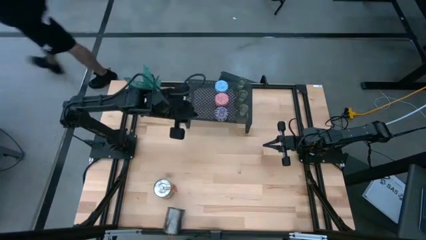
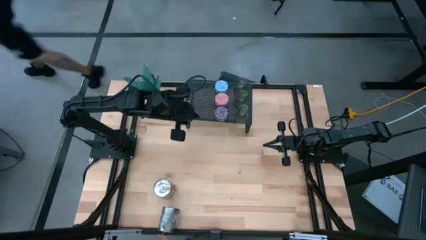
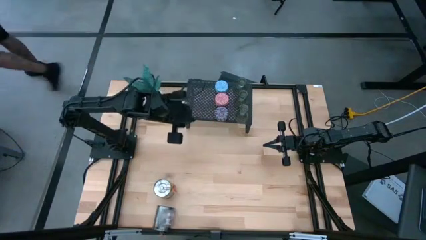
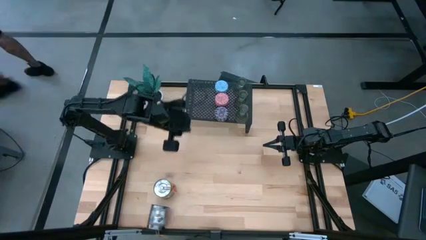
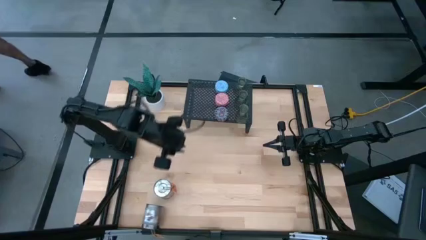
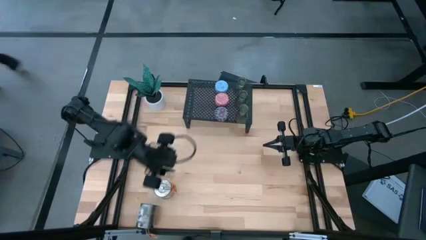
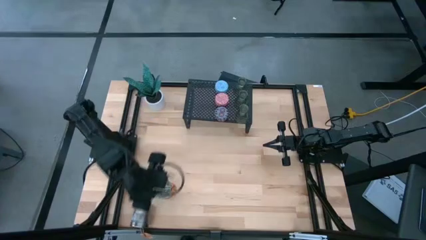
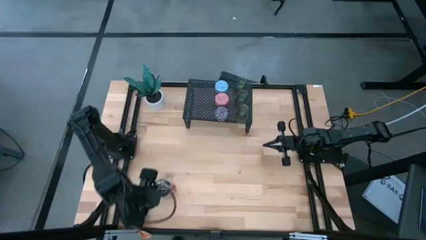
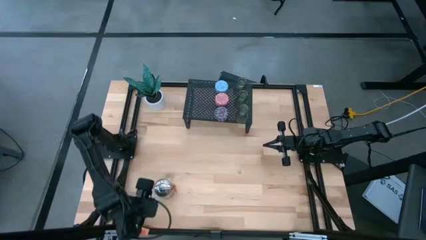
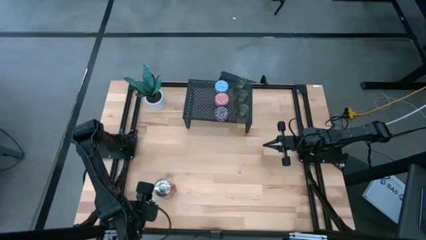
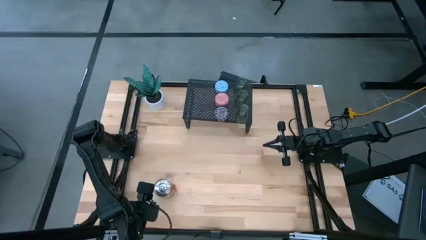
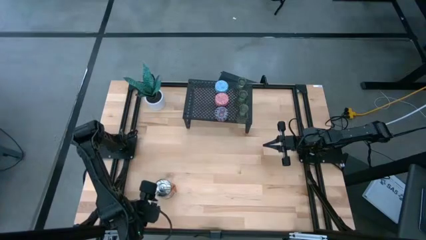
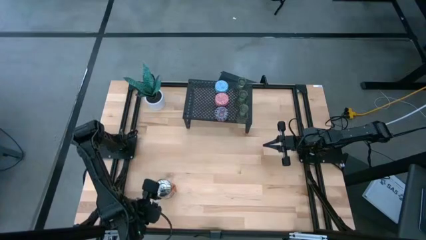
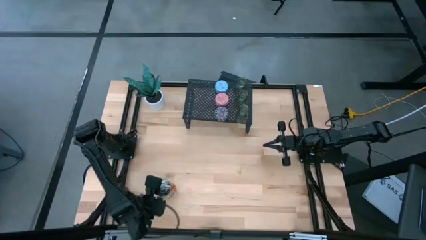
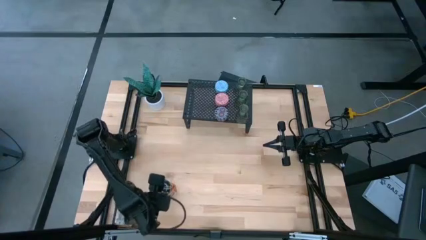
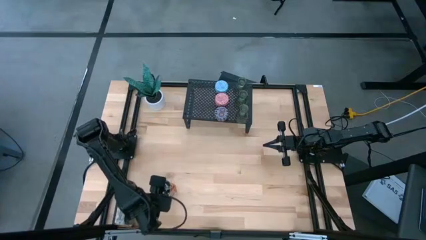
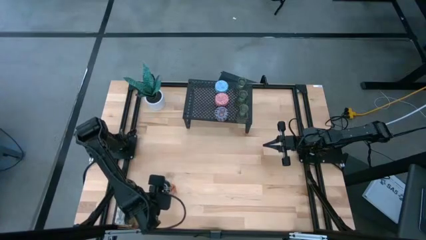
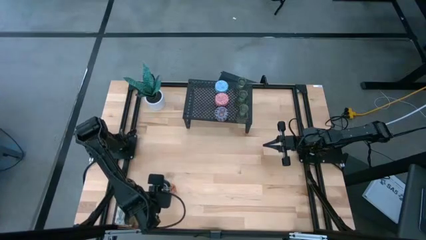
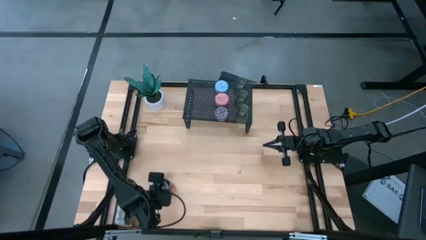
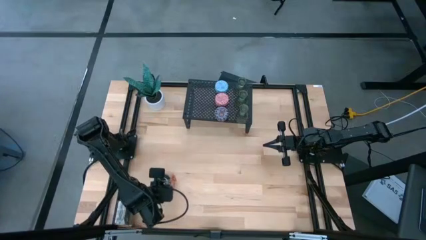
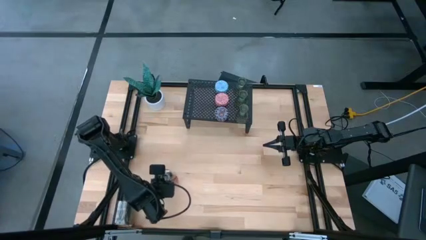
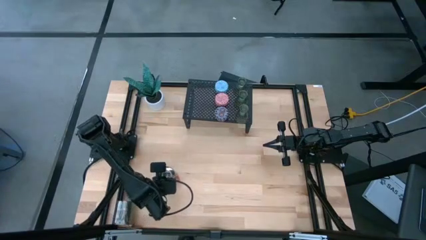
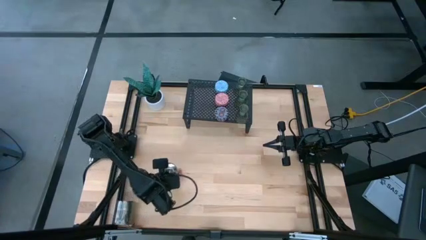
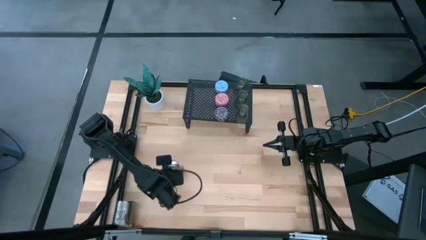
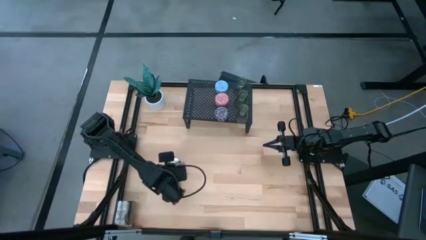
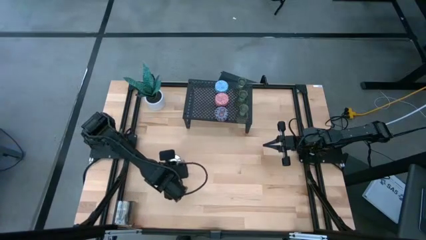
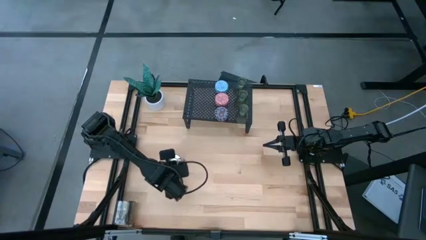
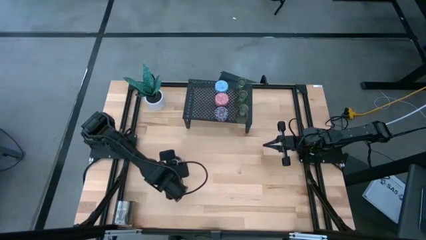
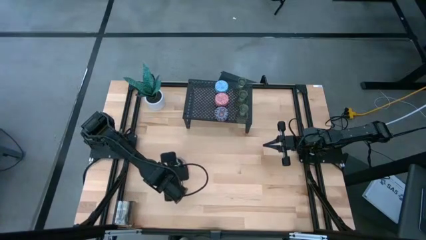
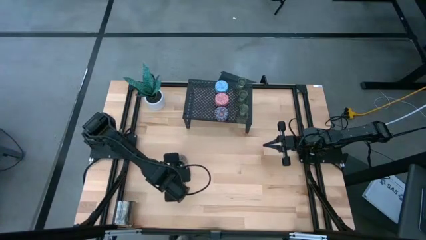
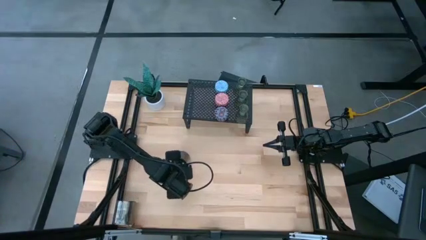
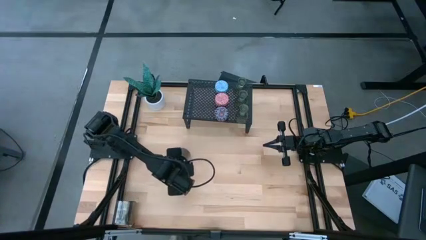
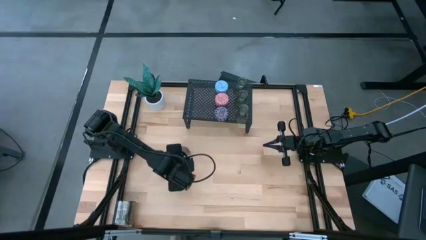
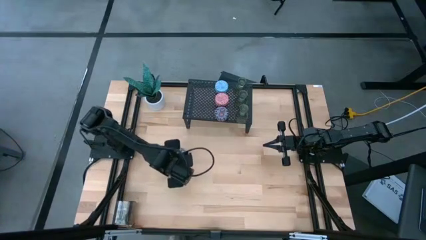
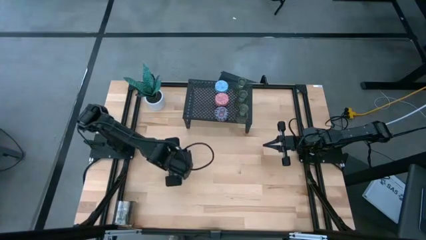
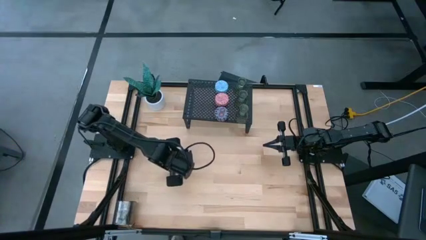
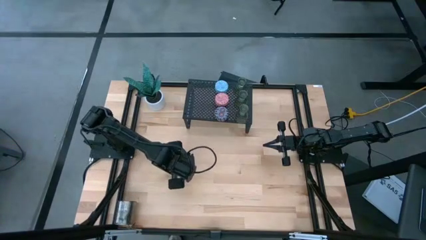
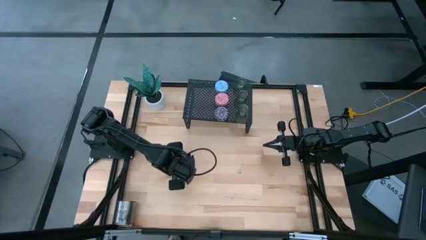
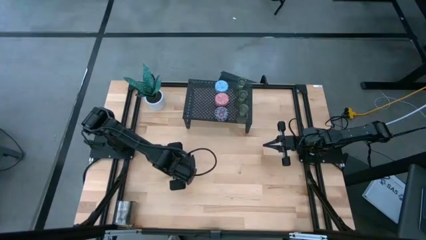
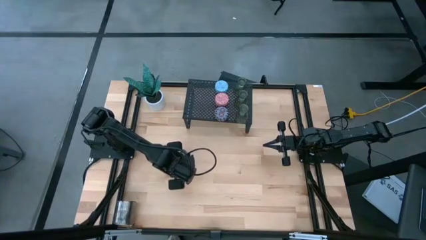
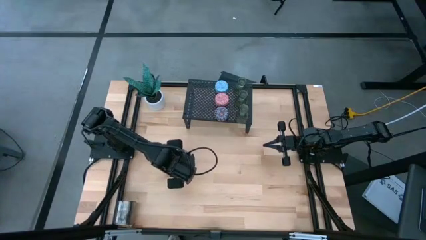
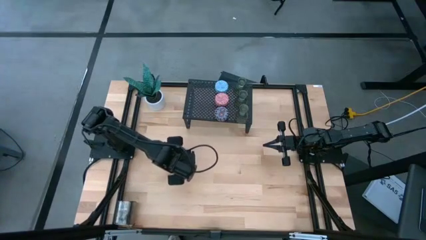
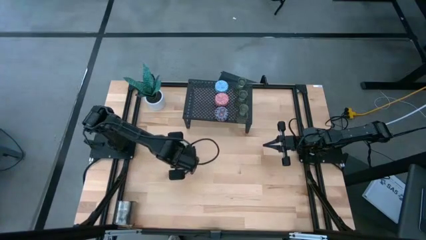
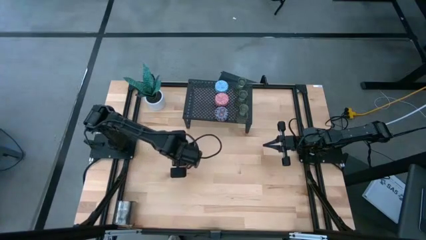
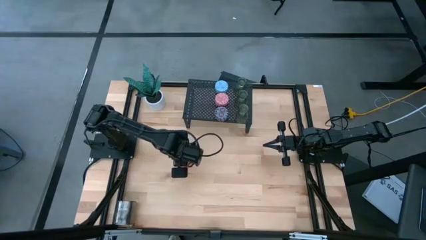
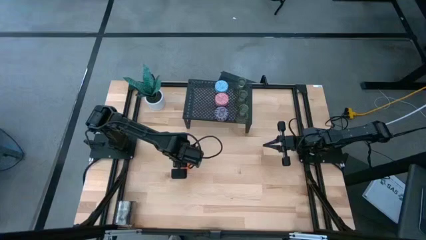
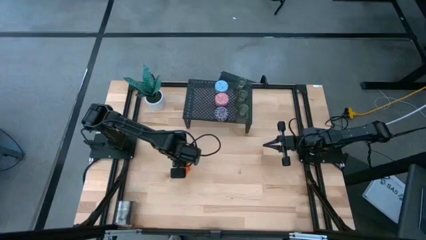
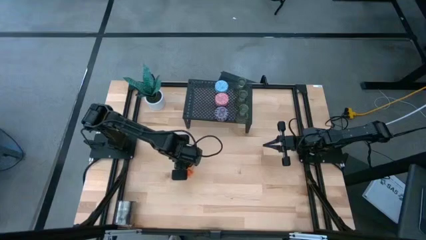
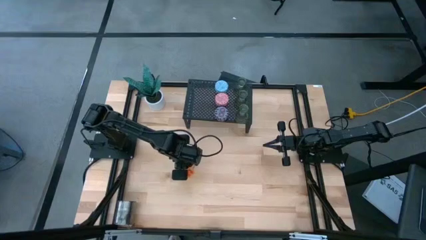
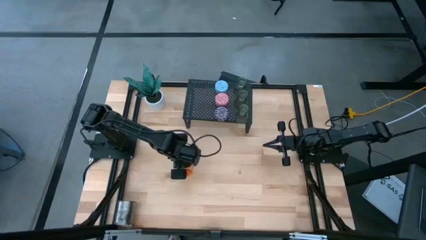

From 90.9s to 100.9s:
Task: Pick & Place candle stick holders
Put the top scented candle can on the shelf

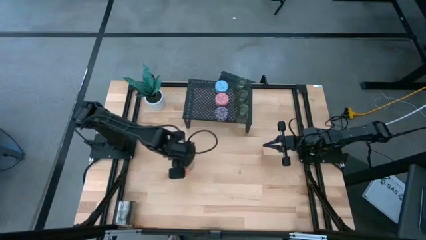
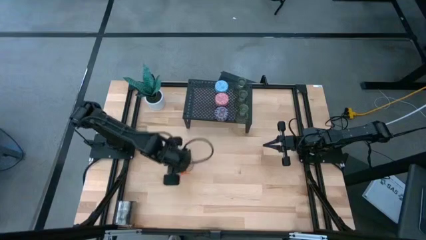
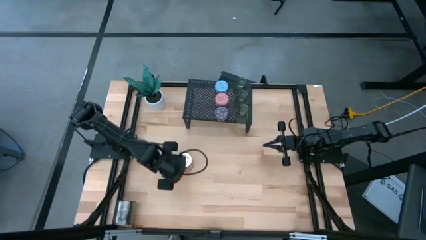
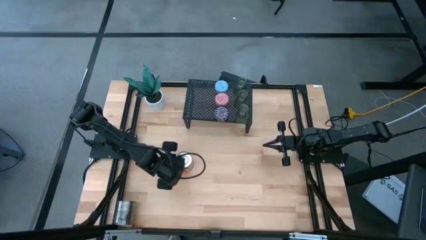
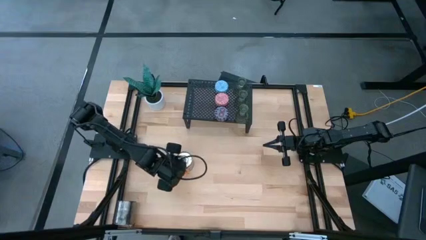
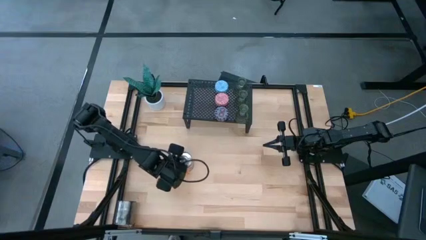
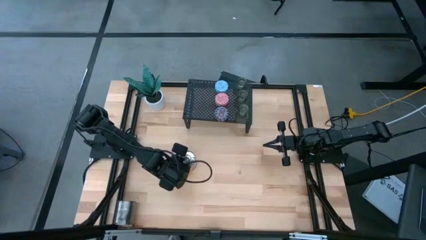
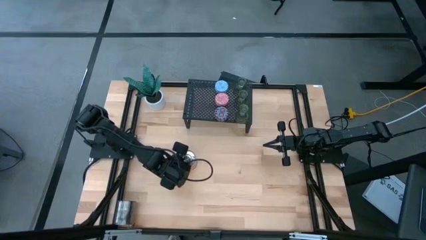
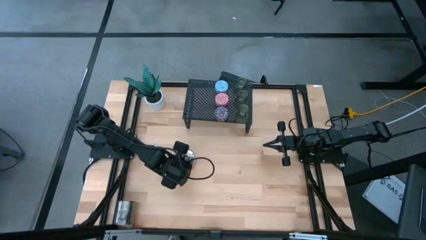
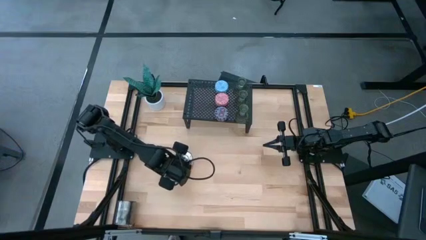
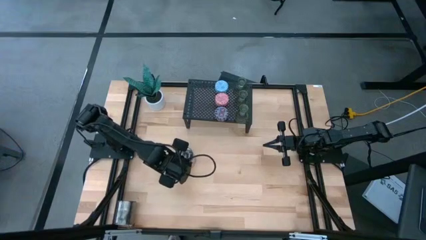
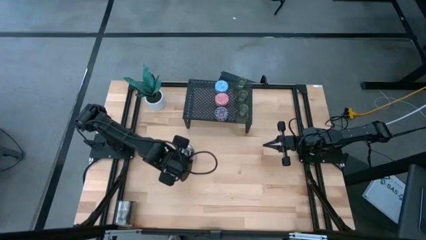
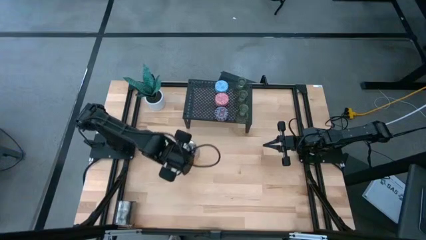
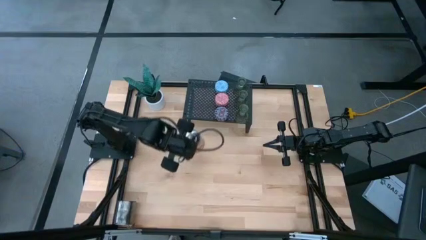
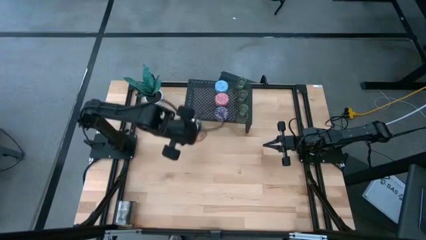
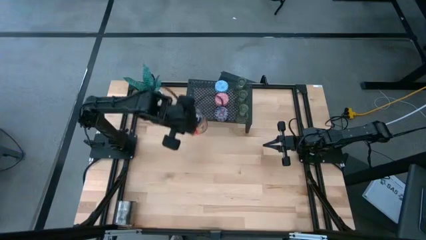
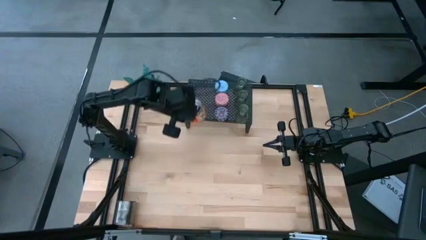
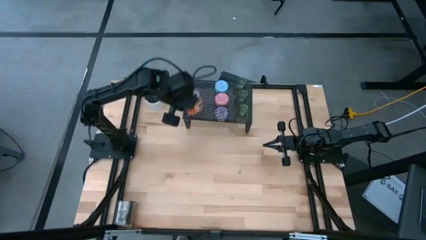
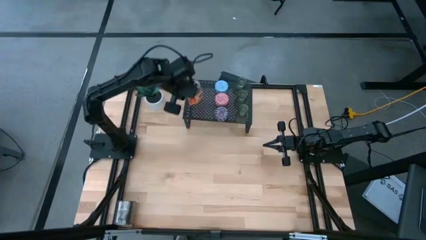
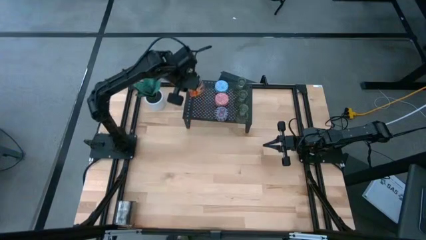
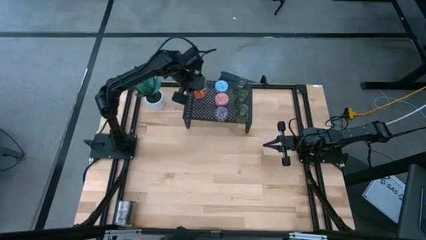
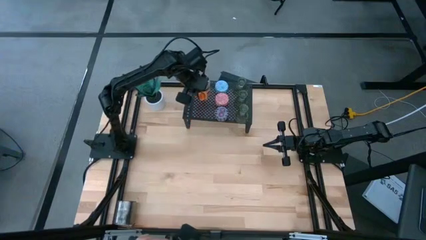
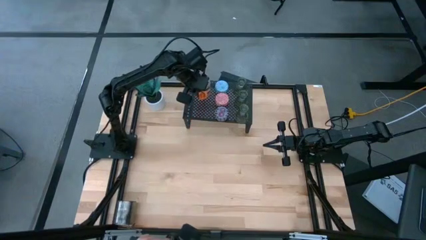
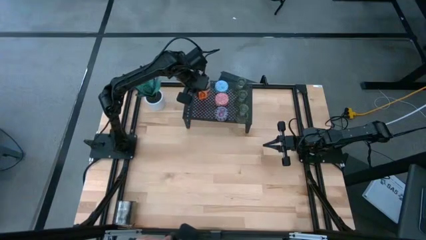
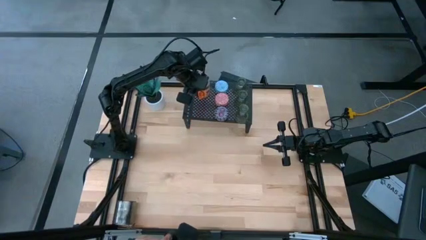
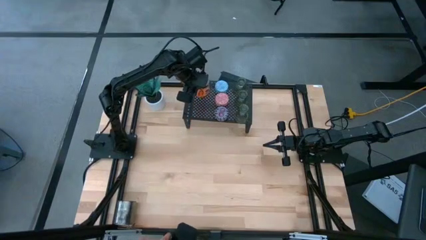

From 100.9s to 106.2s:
Put the top scented candle can on the shelf
